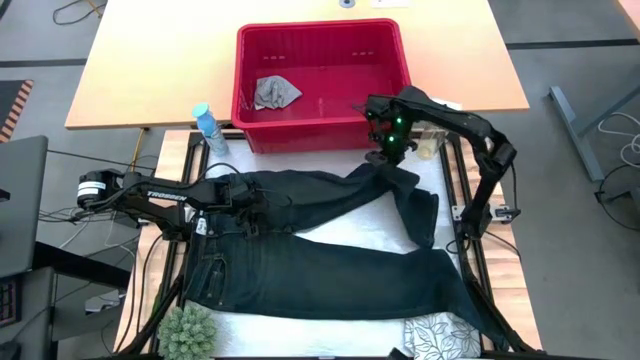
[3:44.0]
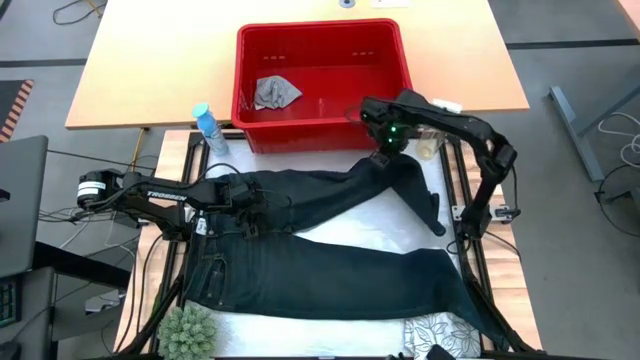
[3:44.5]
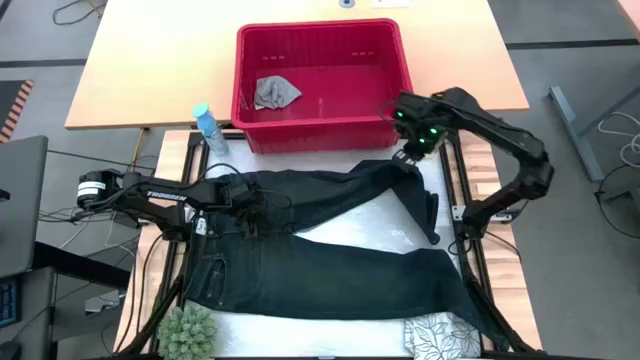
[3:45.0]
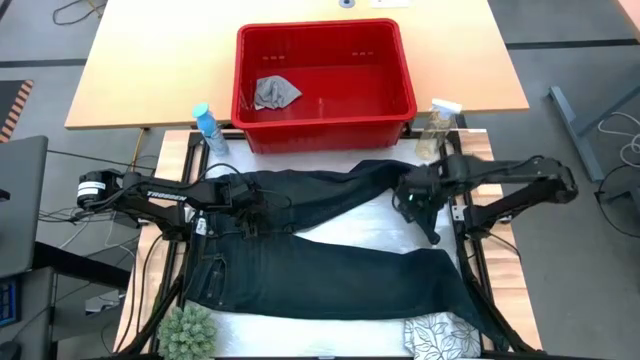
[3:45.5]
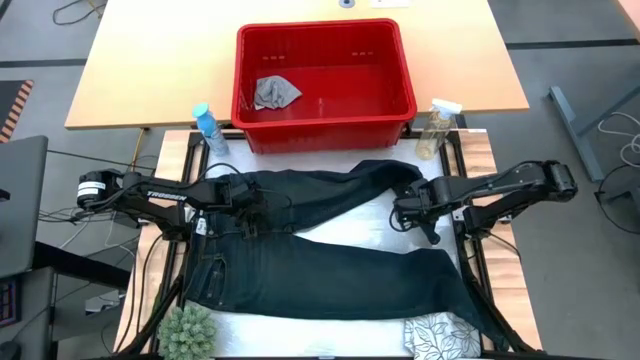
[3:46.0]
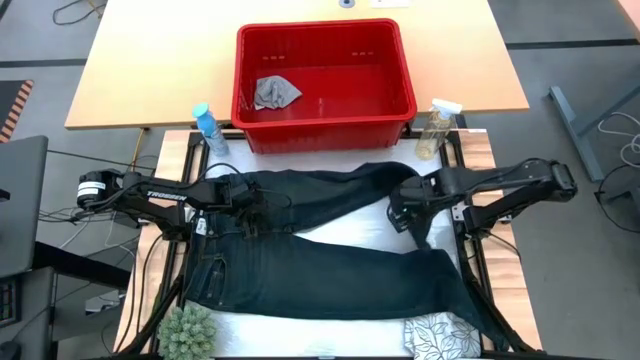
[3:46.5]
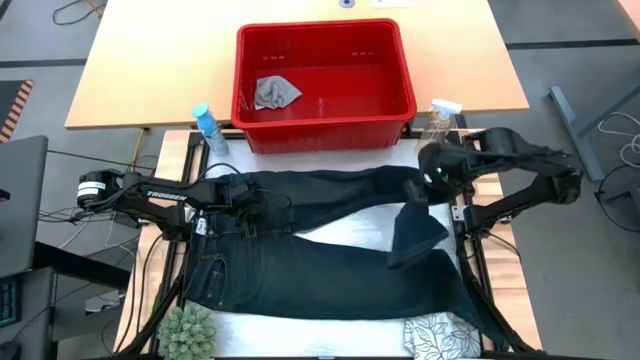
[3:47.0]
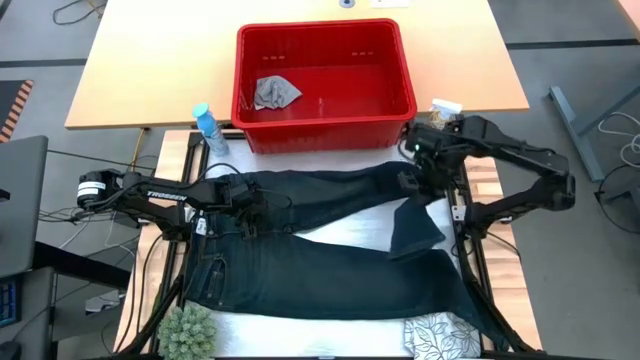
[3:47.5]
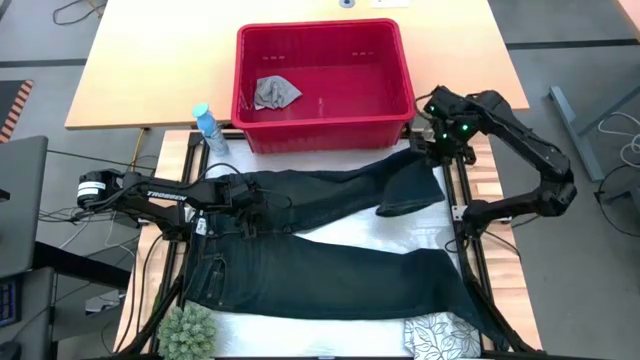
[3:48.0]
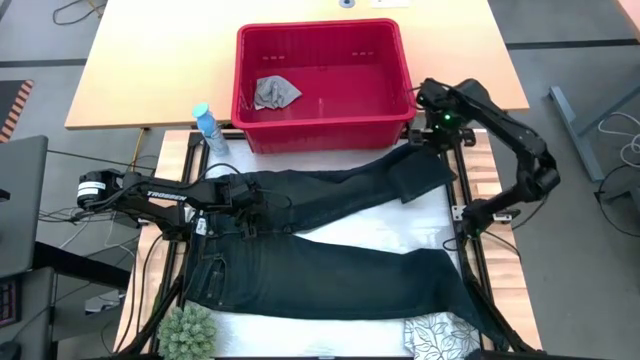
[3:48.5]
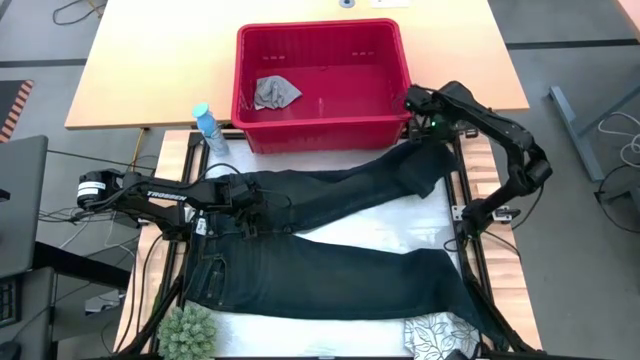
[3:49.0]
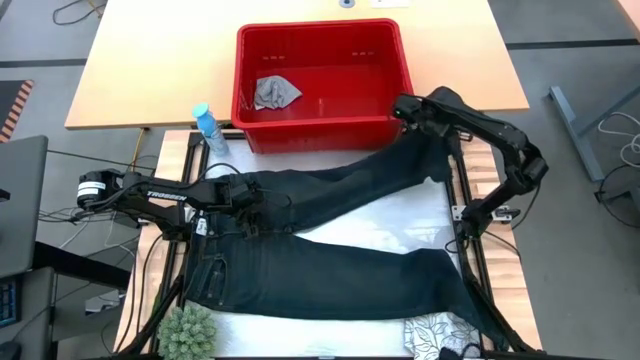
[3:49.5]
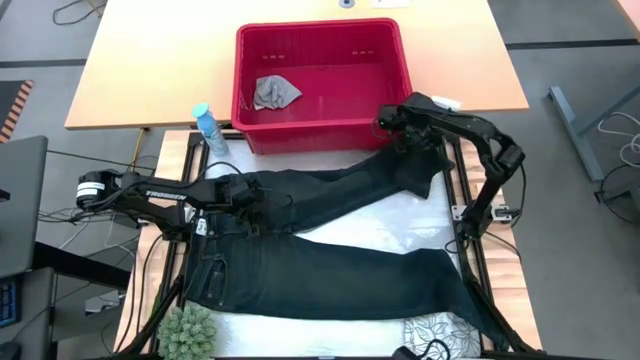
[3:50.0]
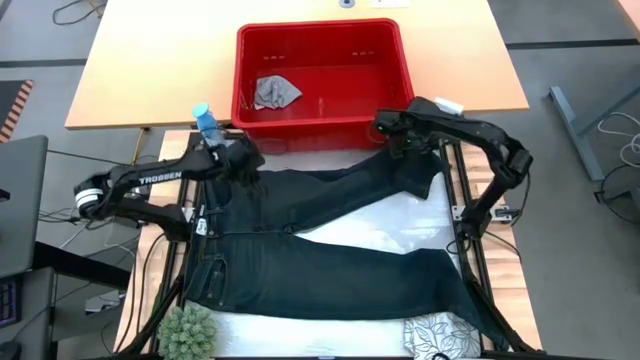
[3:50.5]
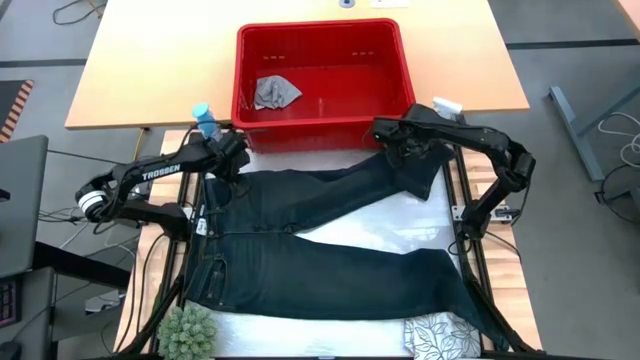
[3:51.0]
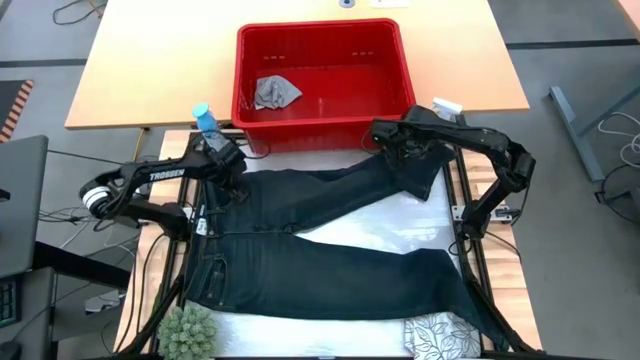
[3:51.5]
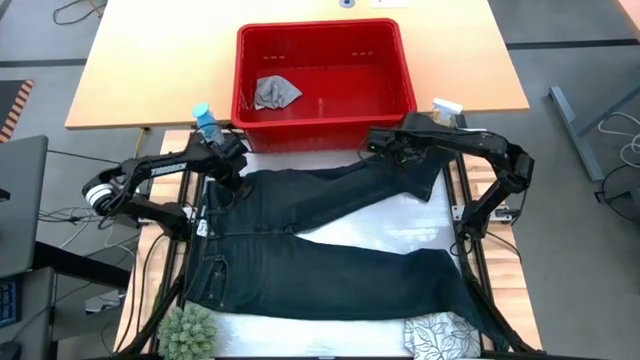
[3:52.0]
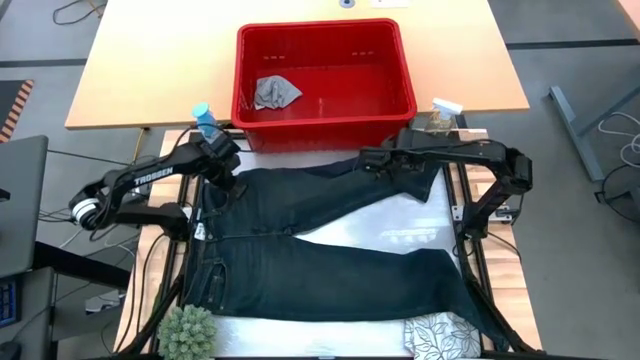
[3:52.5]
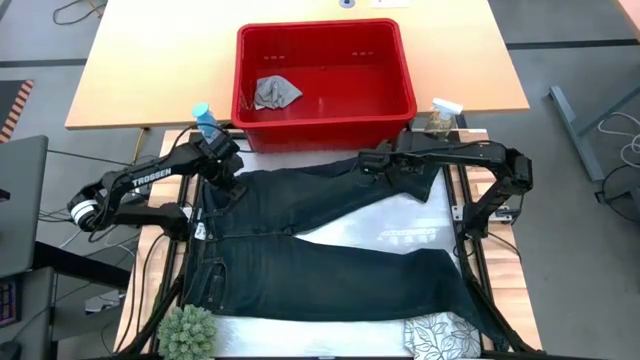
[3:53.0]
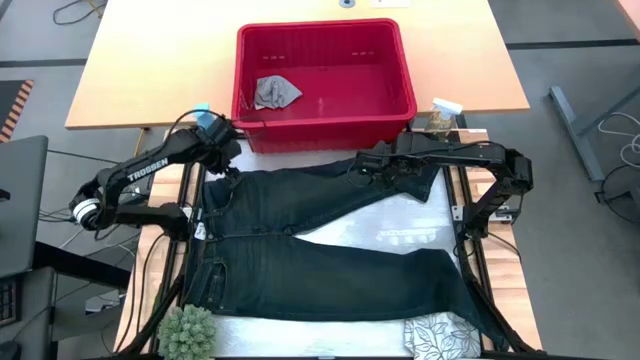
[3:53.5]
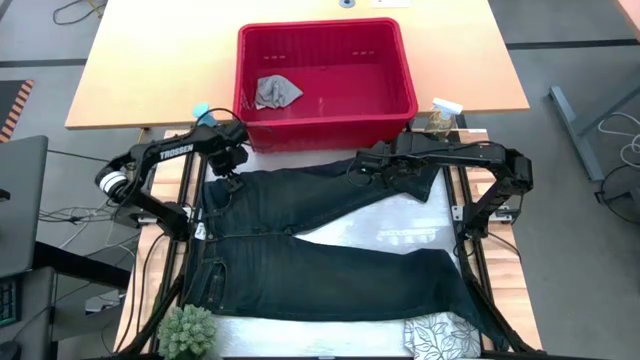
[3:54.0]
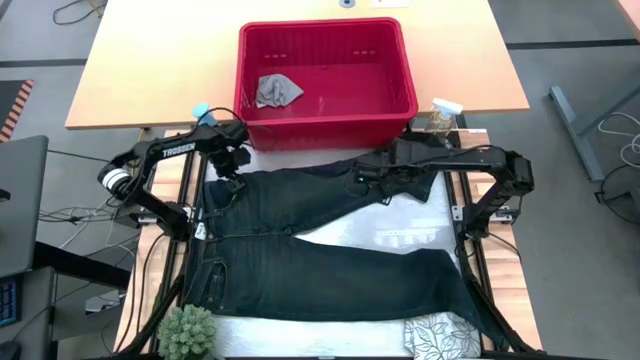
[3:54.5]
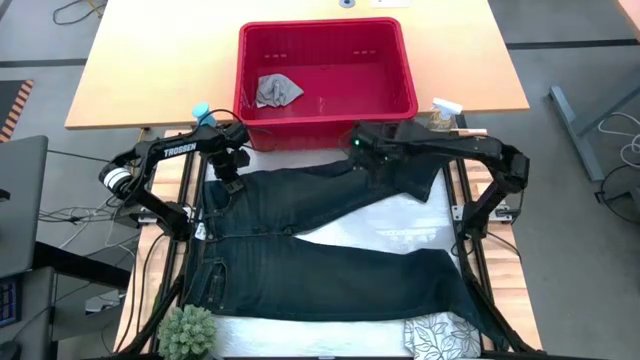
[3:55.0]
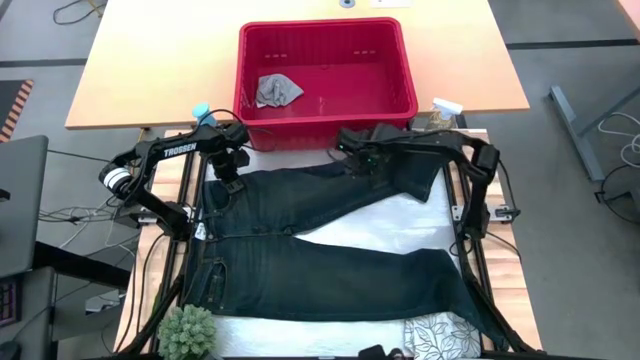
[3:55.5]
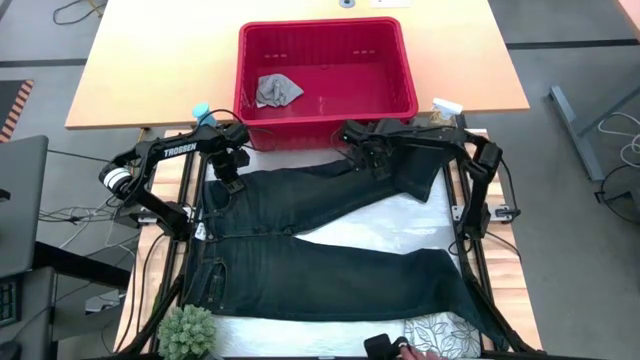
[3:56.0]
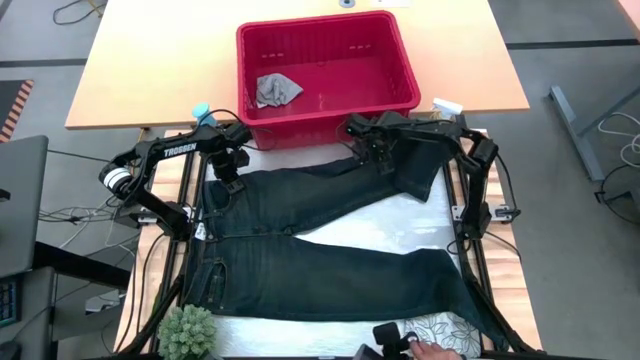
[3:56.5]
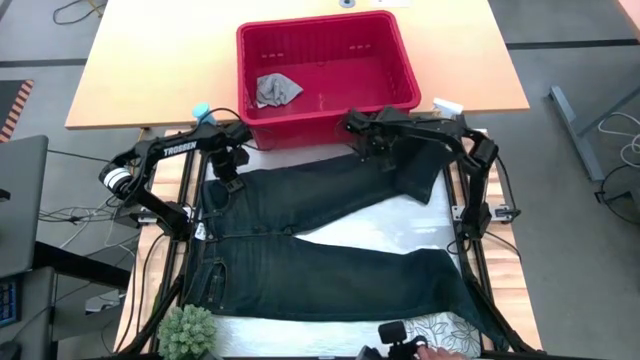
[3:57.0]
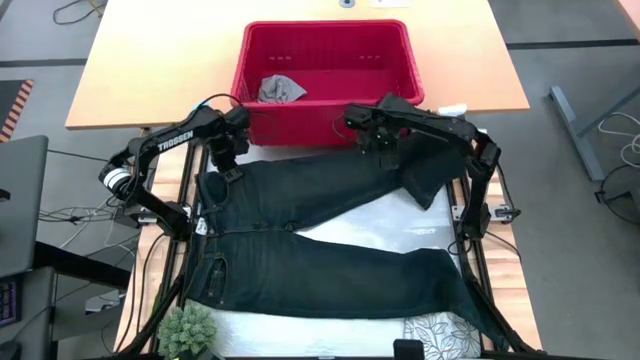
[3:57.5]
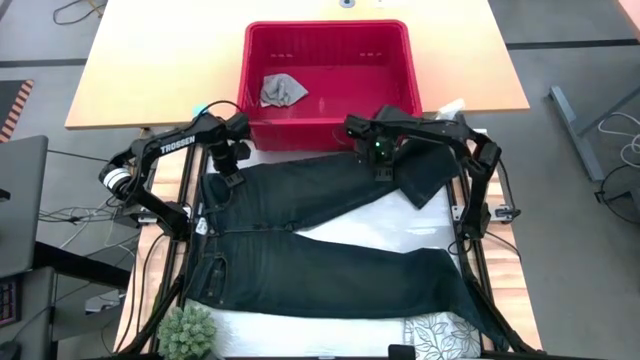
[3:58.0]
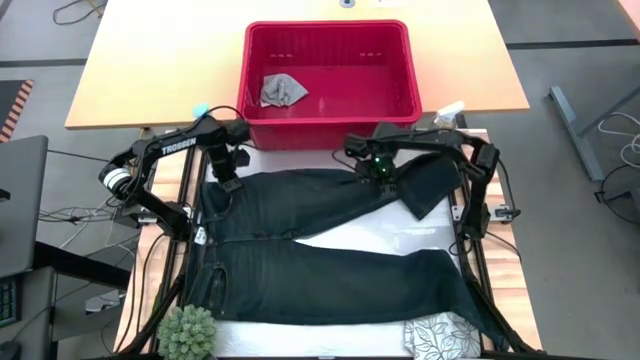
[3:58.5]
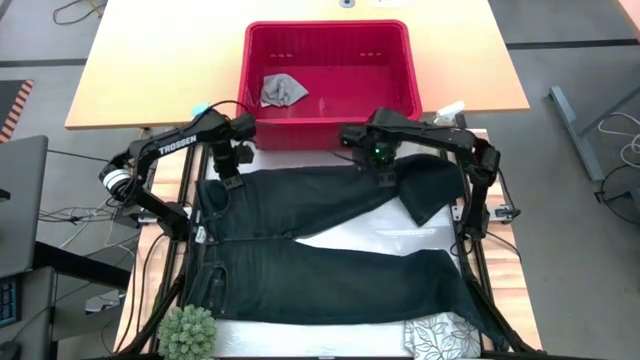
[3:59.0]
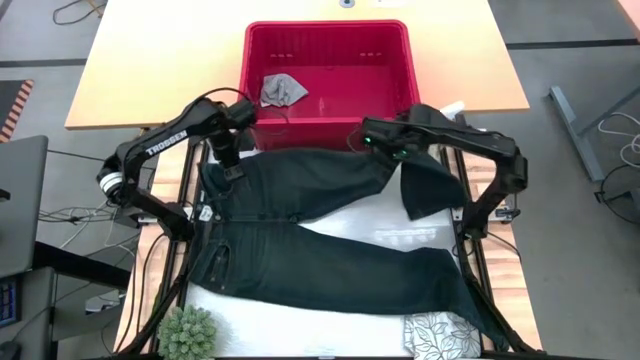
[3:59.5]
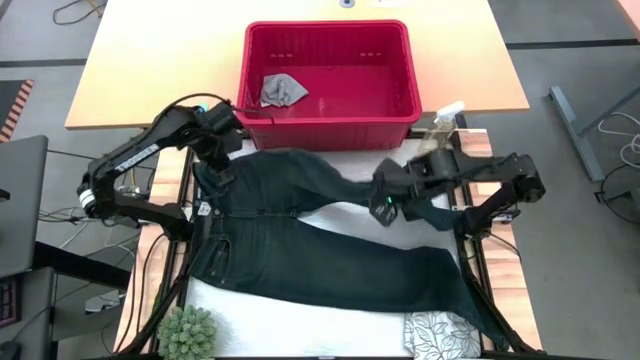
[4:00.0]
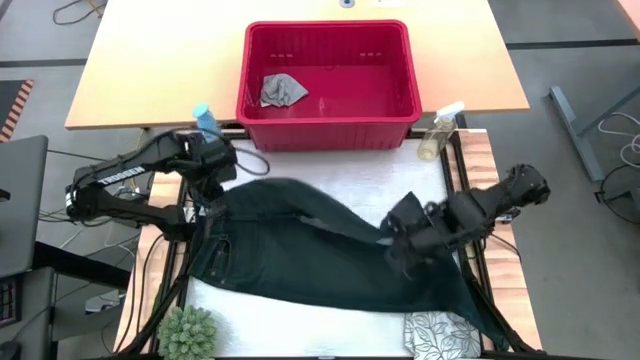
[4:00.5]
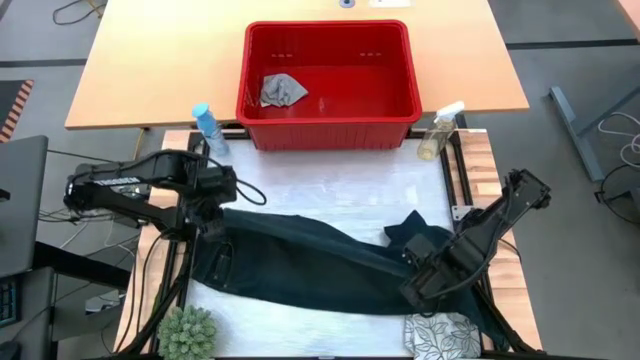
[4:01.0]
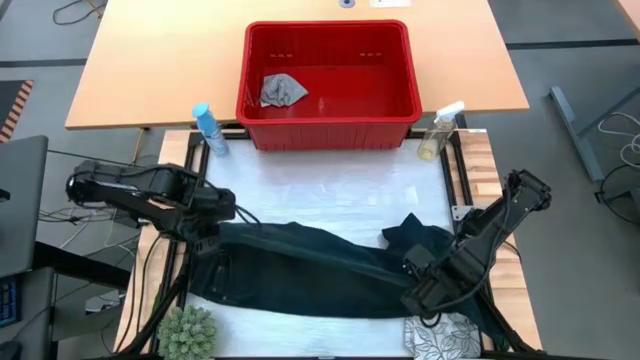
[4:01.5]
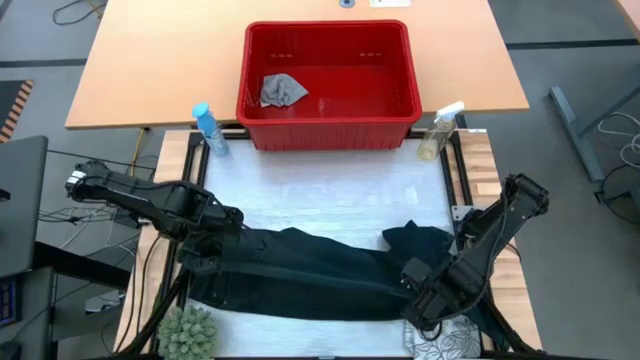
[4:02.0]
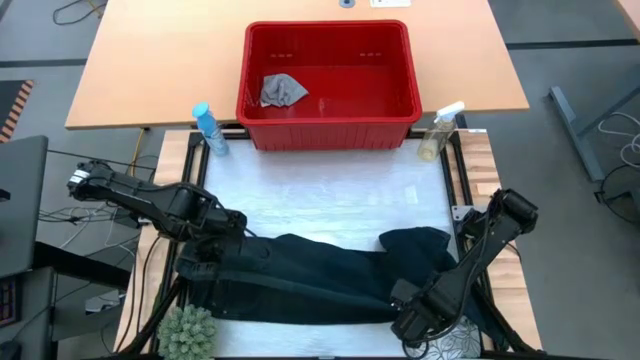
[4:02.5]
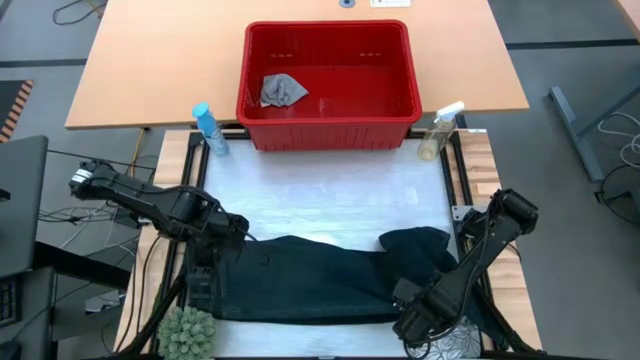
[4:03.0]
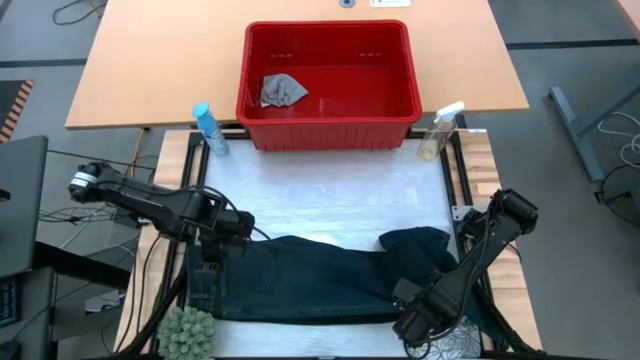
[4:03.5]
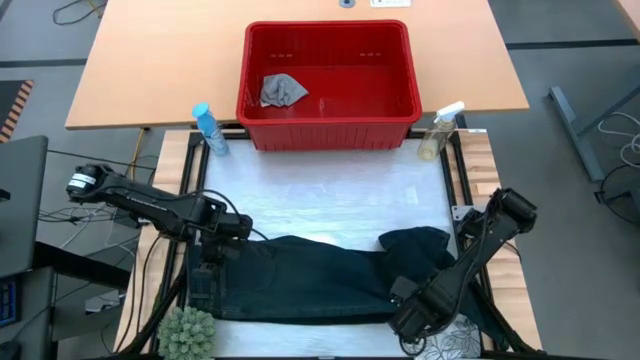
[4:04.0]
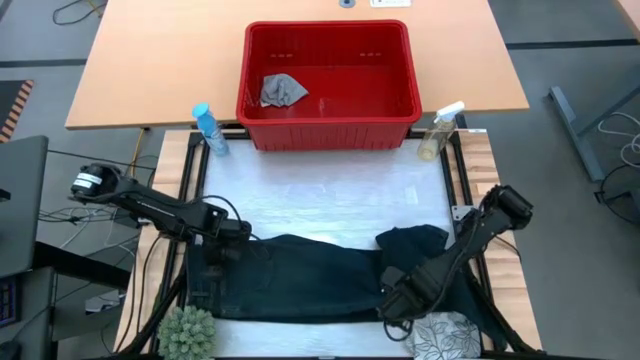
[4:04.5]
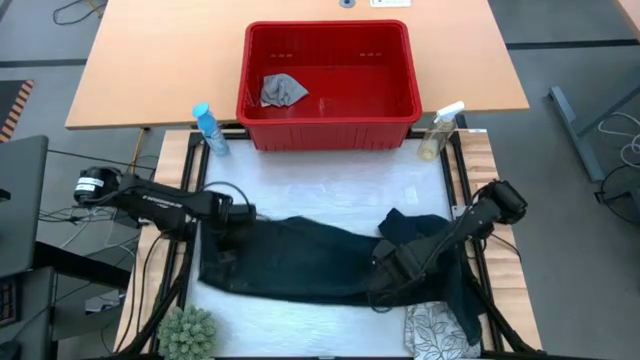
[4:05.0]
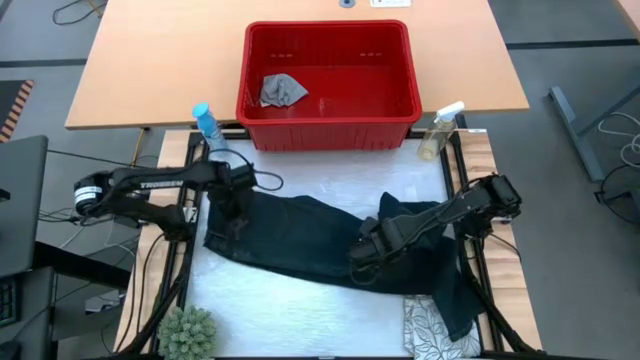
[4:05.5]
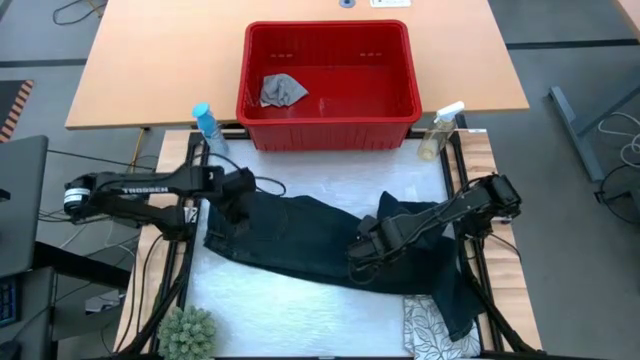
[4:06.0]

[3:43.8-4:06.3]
Task: Fold laundry
Fold the dark blue pants
